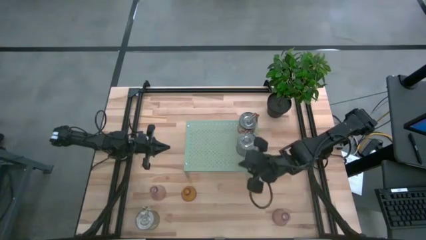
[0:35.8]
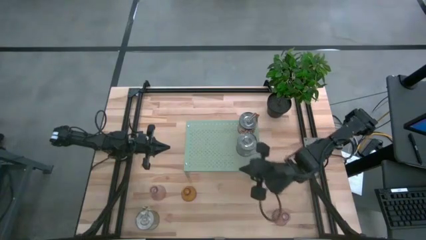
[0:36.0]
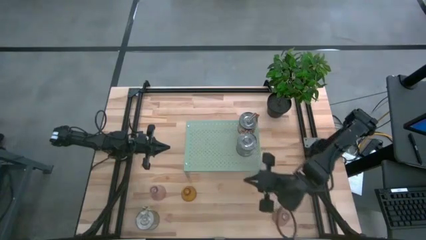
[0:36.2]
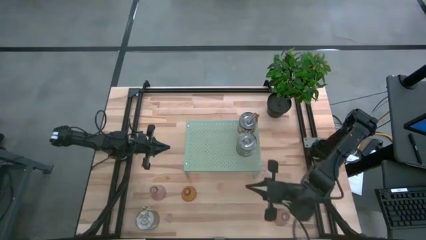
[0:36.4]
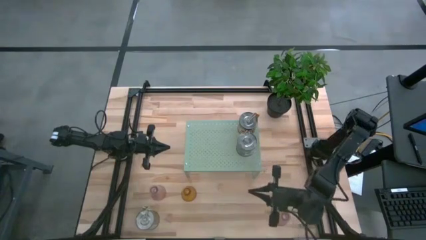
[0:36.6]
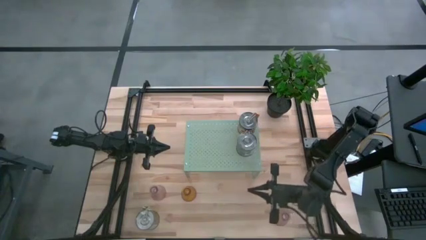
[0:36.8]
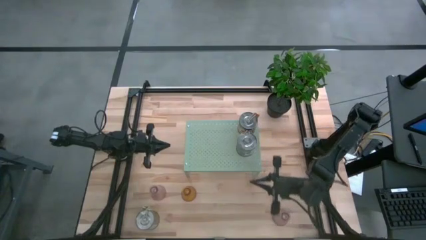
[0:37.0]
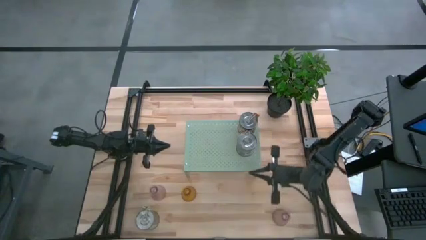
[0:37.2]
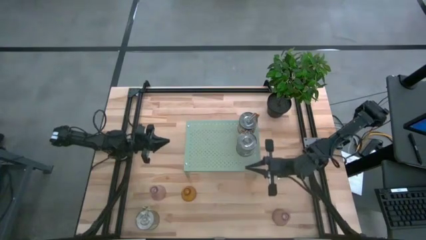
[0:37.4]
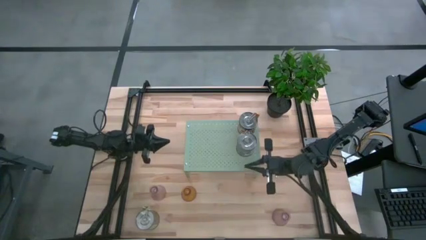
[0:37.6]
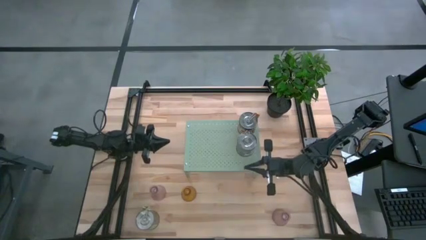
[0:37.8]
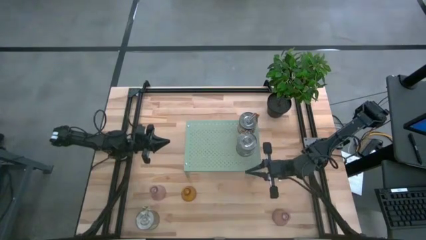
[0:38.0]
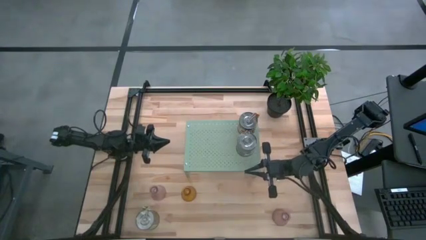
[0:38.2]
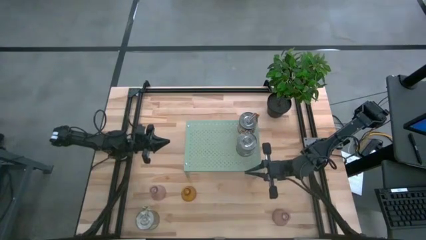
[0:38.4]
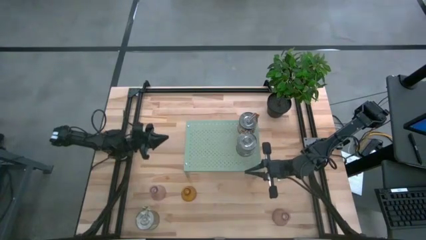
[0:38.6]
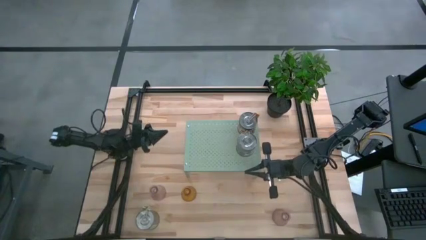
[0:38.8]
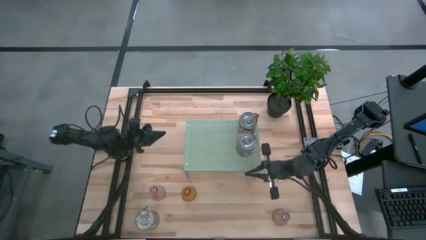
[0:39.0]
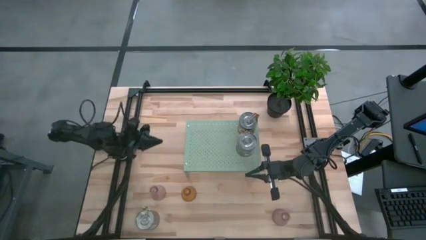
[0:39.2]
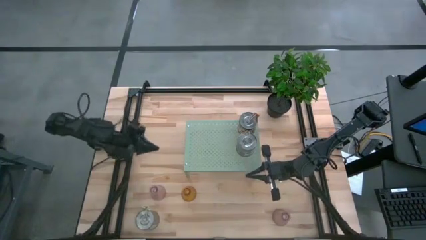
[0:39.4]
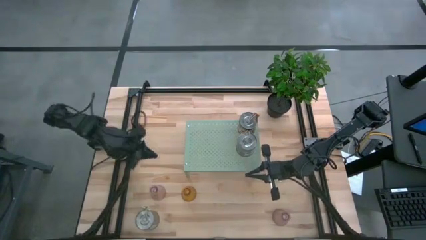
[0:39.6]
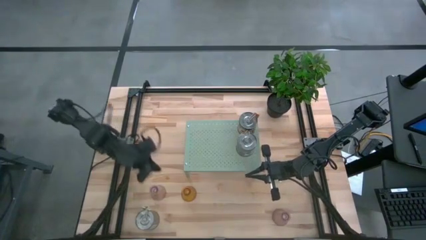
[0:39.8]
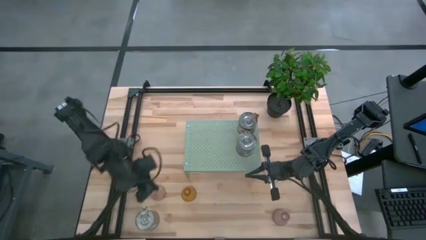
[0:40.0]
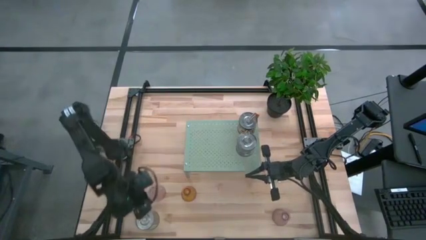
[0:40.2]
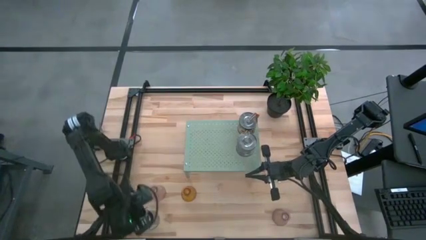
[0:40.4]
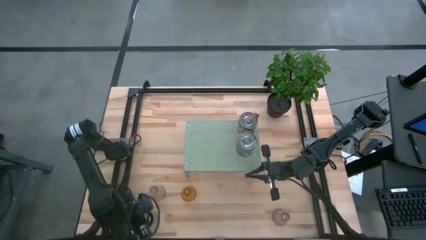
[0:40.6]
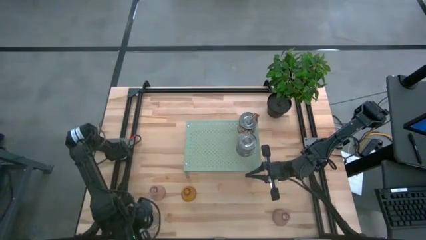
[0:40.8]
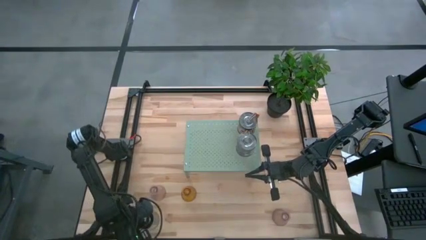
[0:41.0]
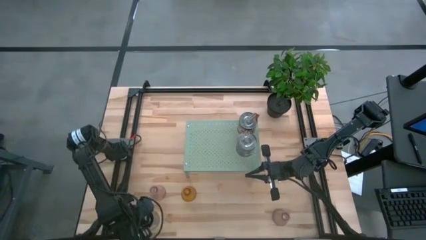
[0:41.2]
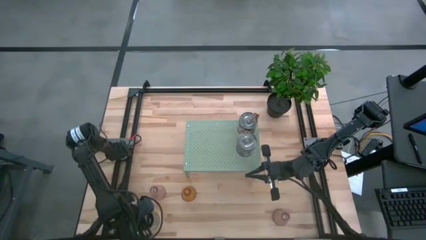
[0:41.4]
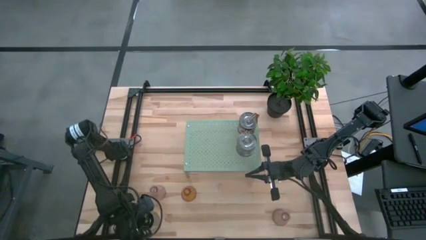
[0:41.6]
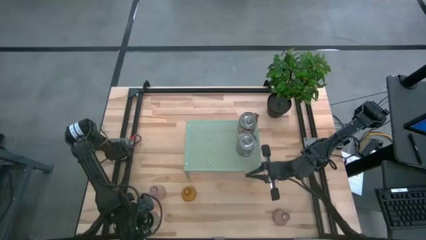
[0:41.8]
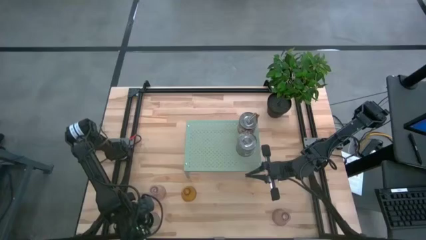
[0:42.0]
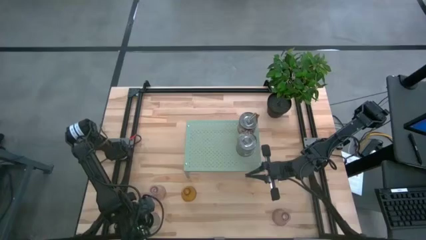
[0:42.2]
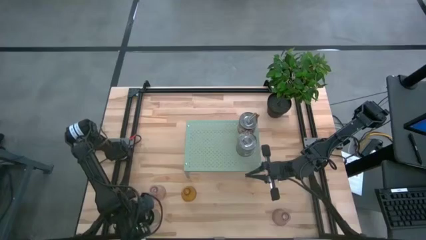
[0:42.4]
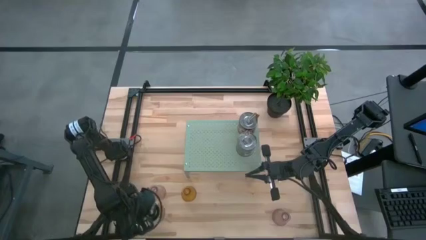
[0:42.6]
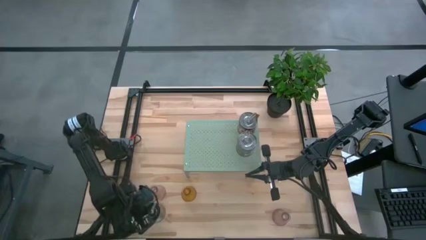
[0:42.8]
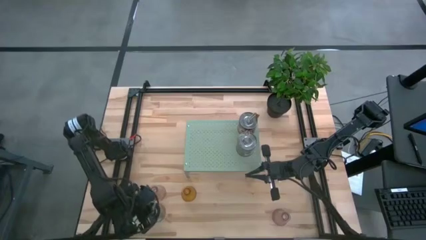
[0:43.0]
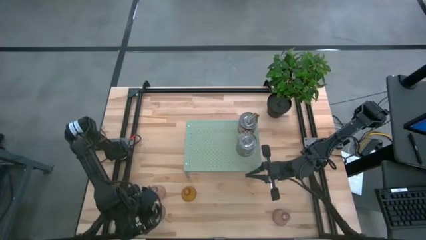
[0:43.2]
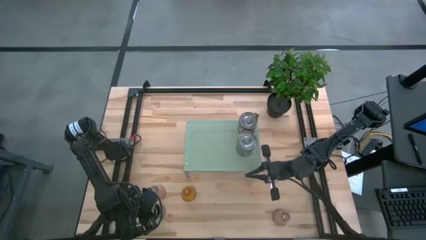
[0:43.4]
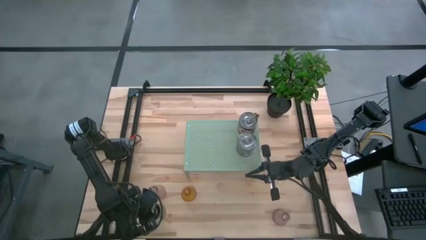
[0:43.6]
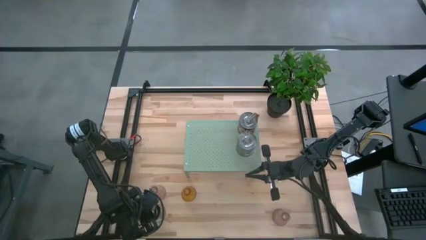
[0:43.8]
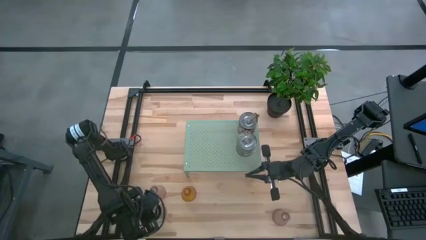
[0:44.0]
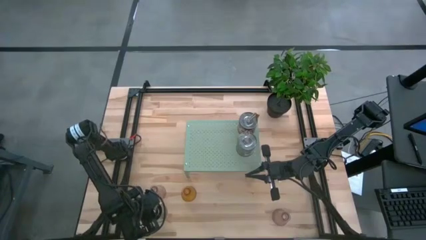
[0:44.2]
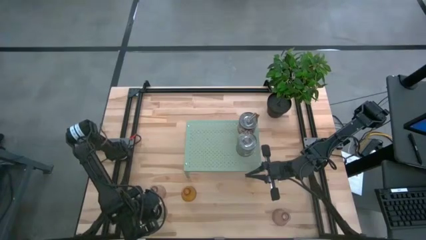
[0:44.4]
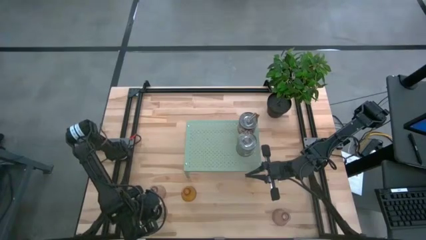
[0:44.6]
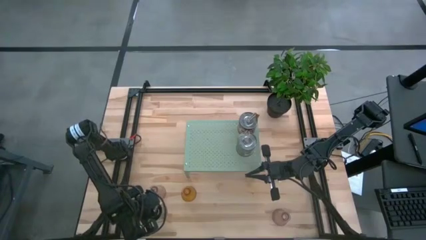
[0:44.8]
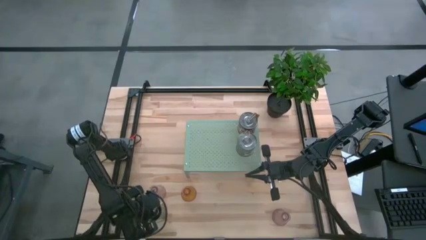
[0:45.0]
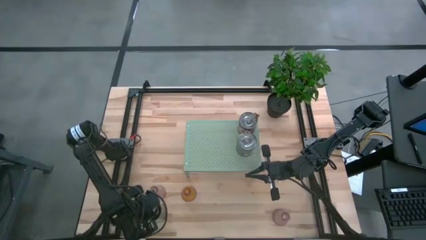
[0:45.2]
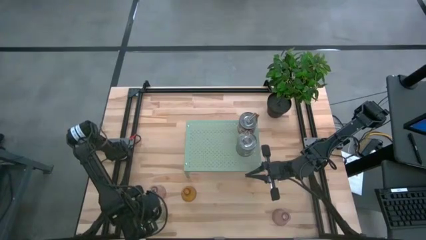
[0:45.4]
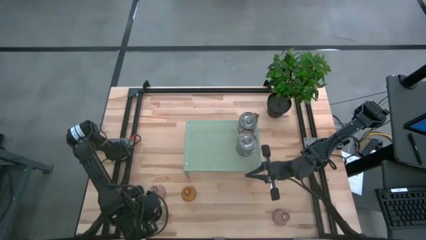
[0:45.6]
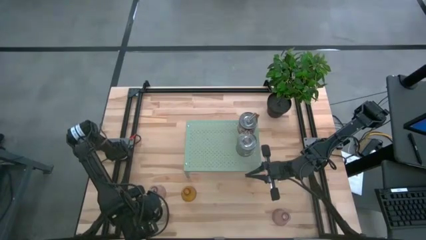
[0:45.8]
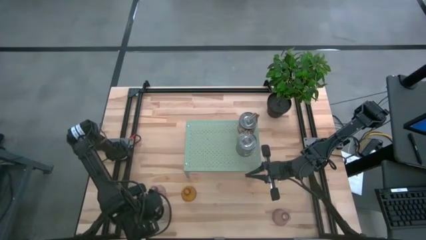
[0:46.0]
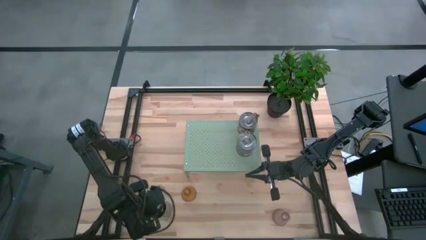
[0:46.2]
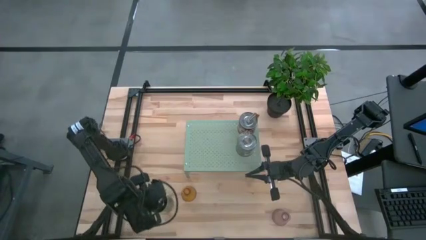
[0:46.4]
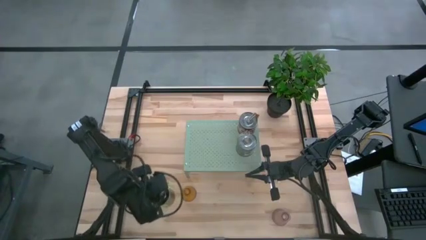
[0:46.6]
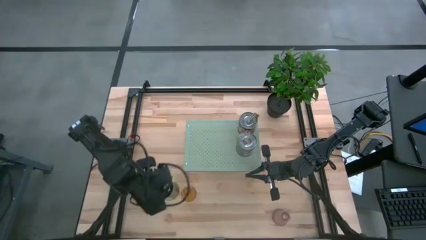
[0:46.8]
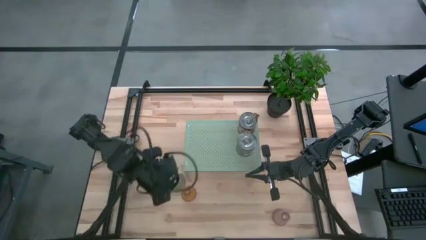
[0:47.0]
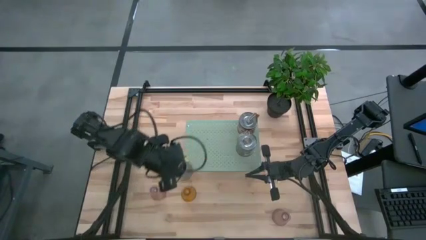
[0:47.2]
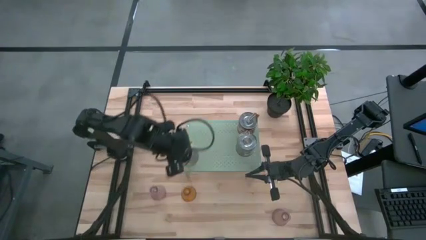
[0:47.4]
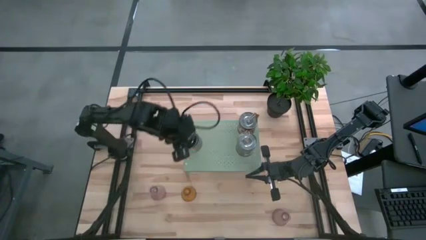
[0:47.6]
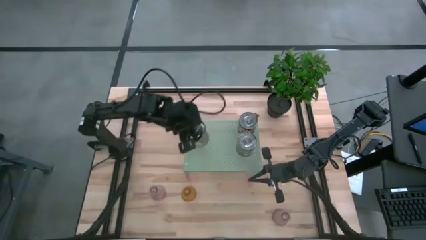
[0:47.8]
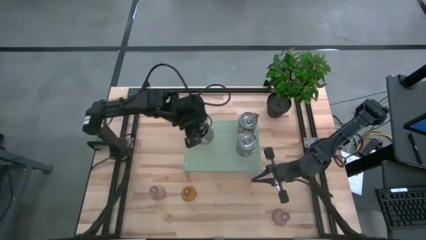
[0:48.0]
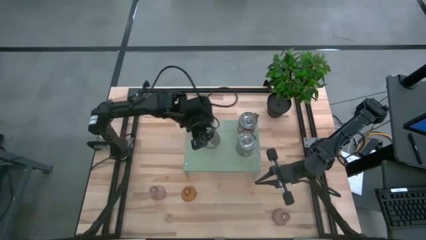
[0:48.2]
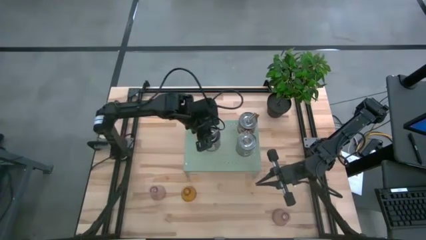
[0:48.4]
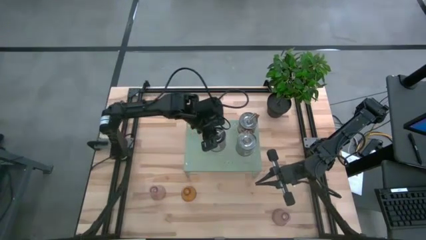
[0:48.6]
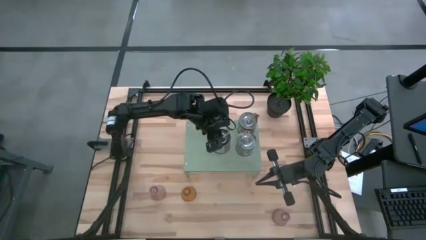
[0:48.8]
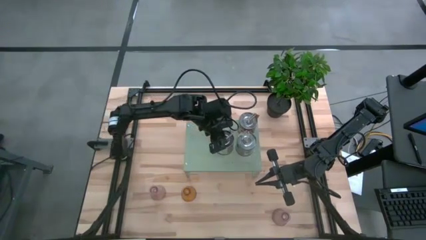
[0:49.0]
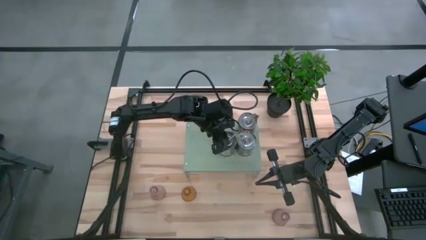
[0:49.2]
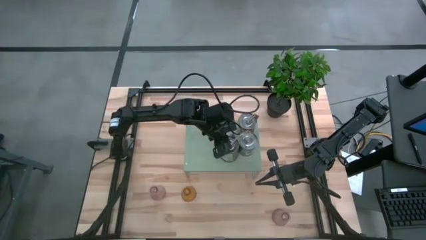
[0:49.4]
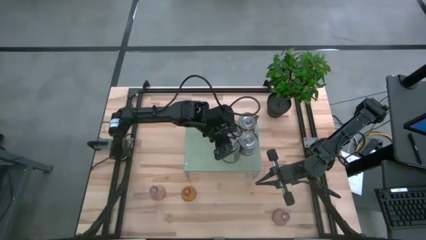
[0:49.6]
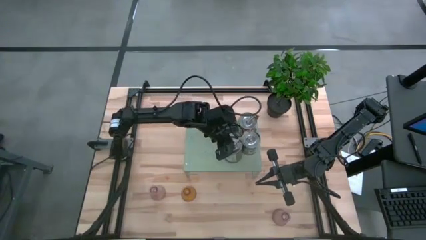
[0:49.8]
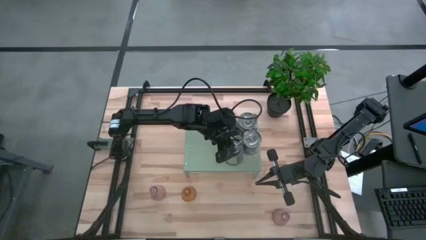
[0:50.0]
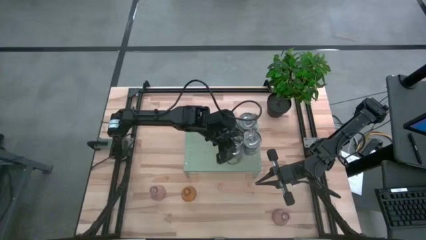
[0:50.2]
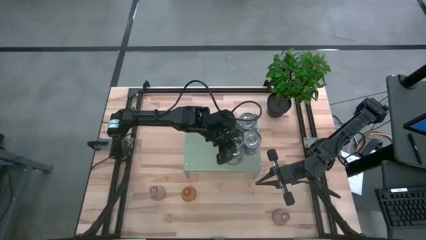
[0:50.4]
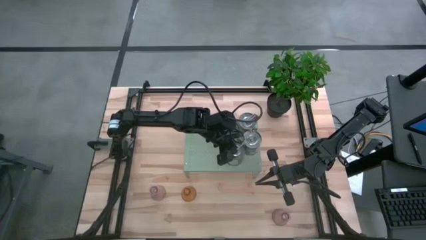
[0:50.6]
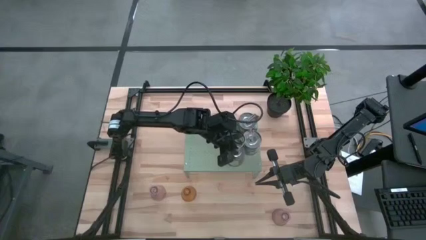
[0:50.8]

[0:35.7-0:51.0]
Task: Pick & Place candle stick holders
Put the green scented candle on the shelf
